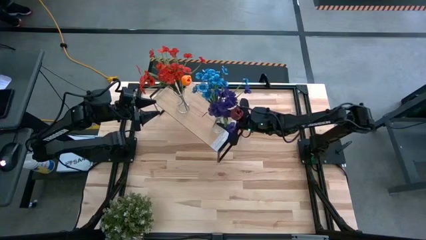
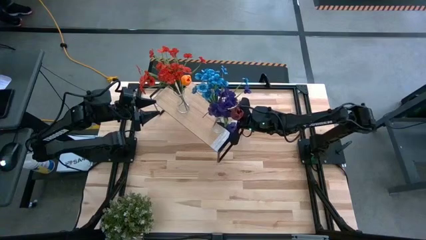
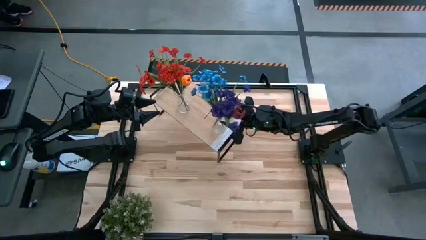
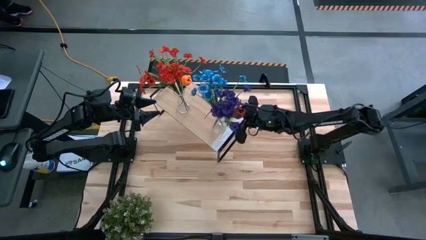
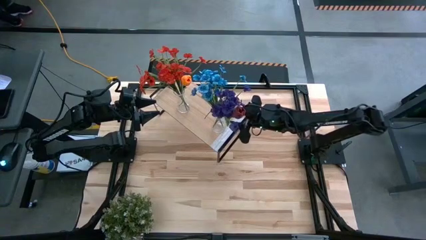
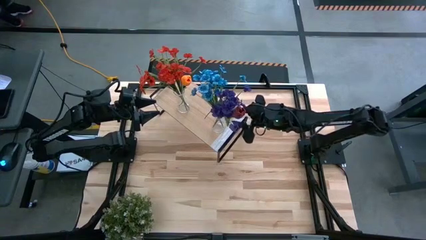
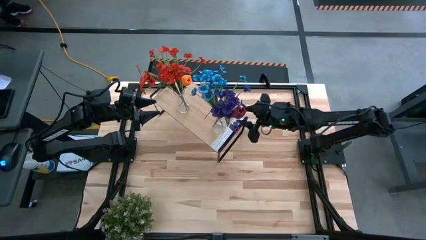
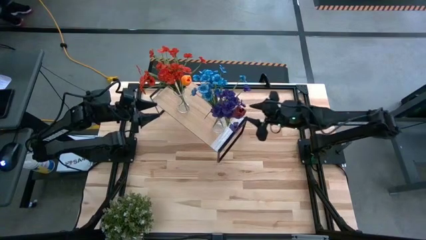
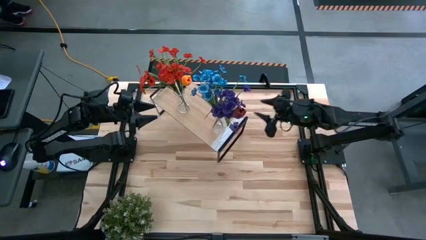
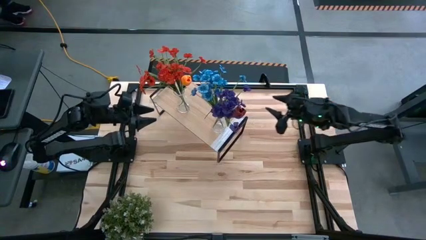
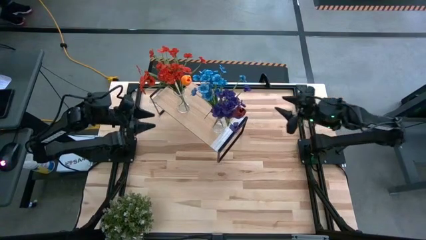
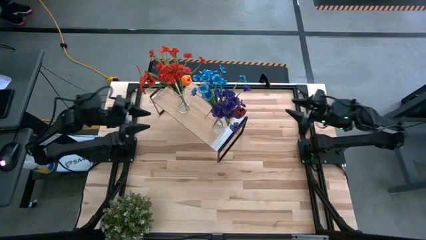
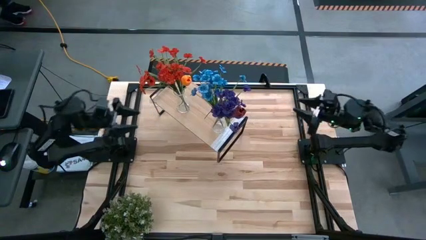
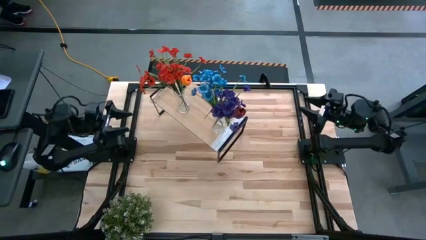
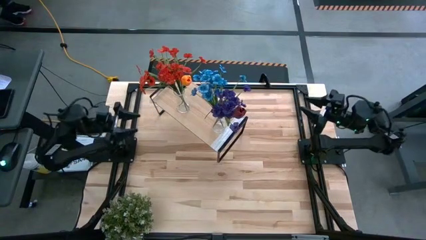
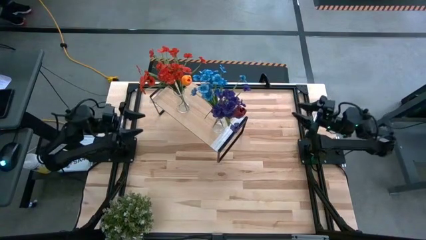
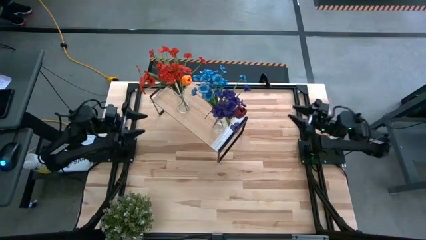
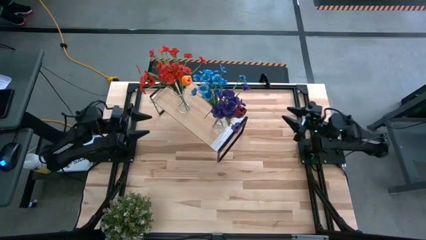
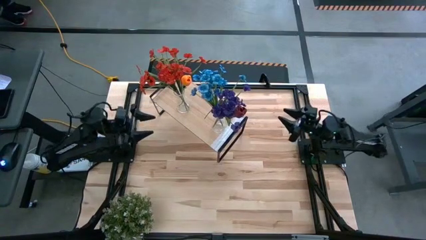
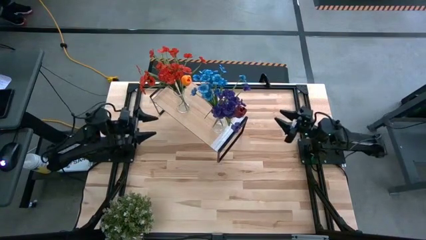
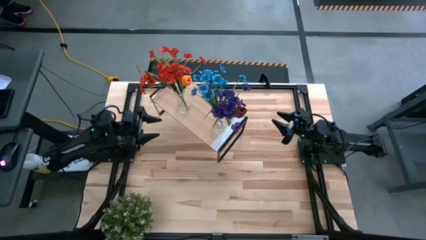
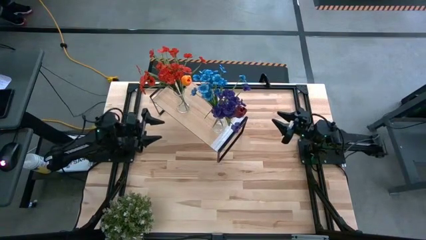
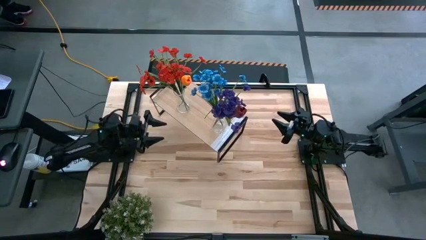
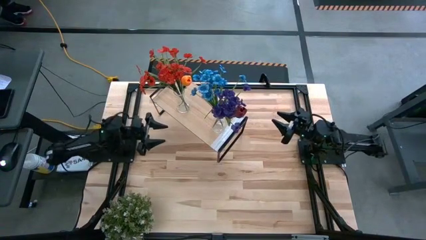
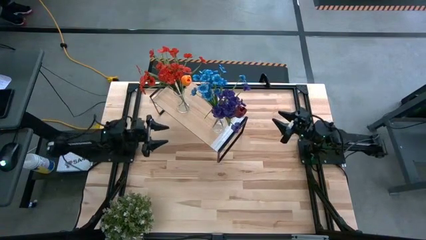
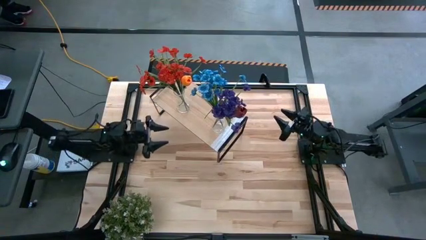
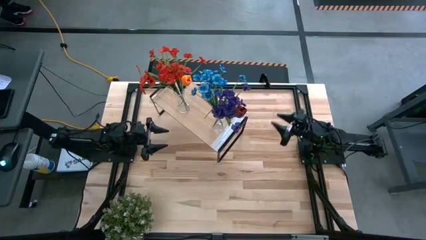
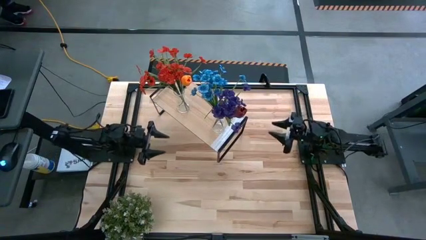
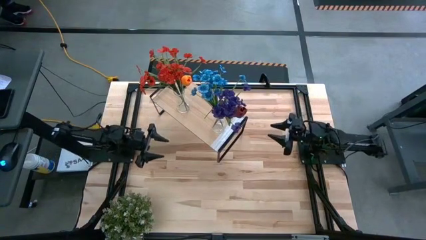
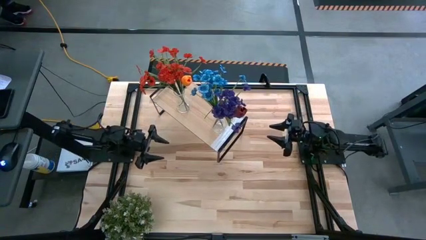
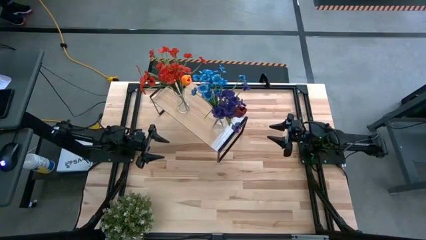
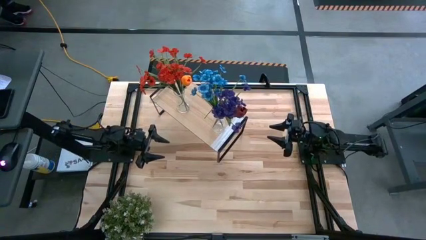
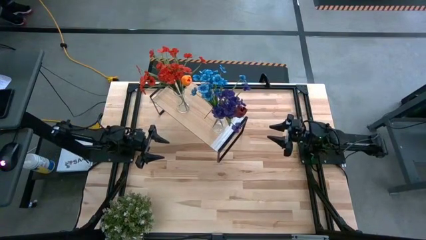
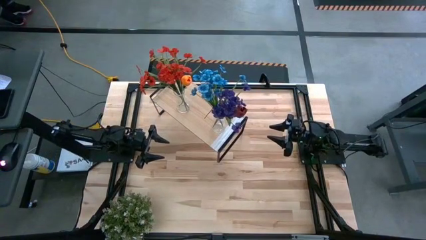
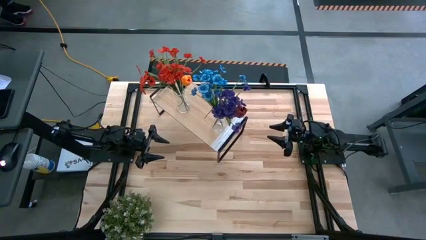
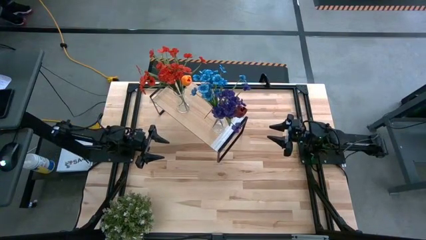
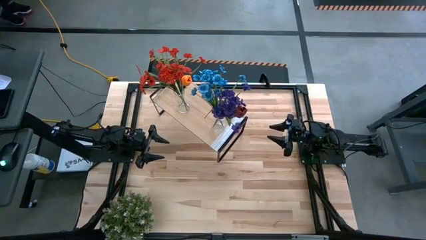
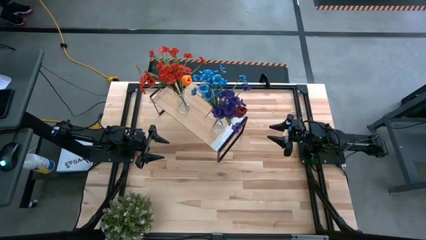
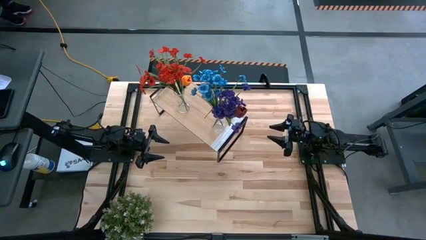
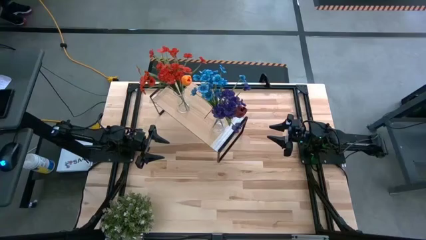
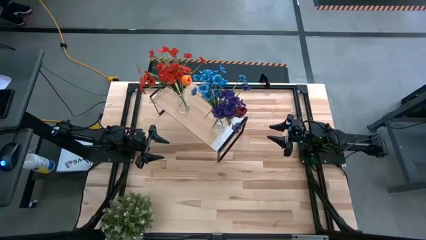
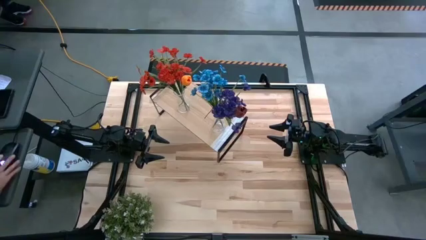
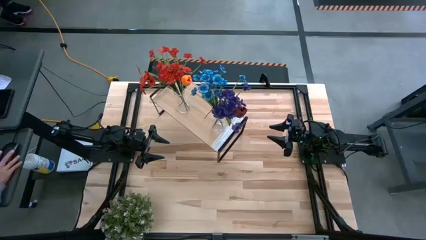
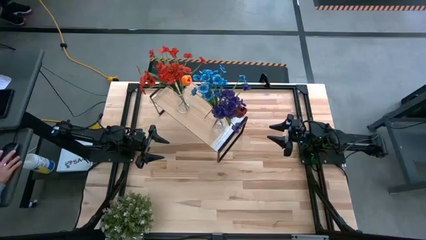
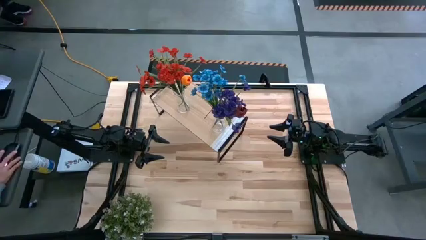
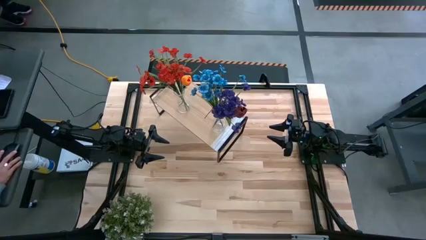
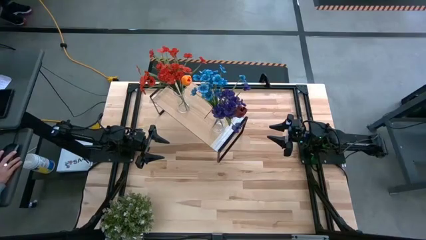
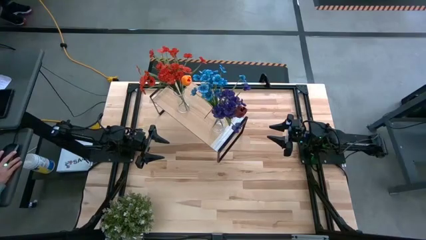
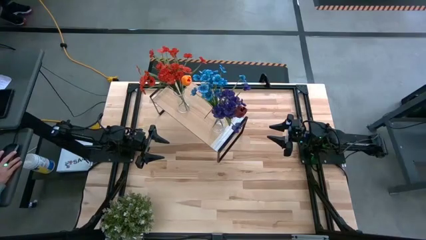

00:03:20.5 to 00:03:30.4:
Task: Pick and place flowers into a vace then onto a shelf
Return to Home Position

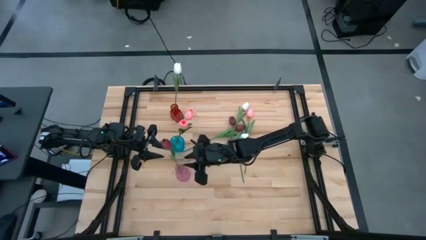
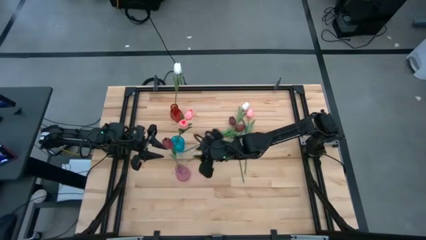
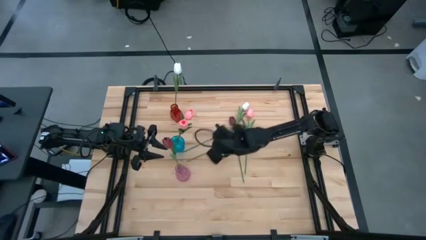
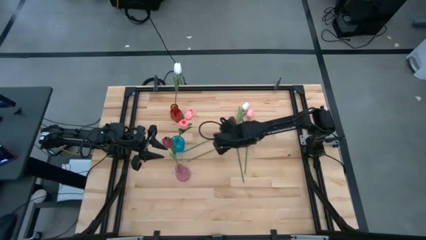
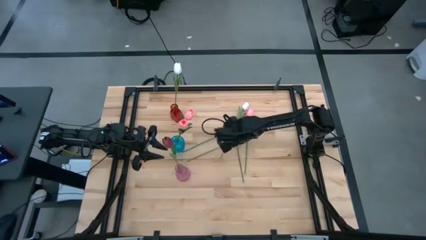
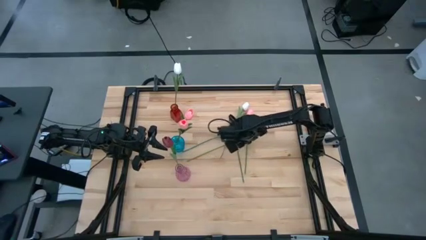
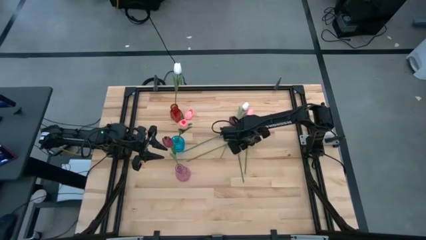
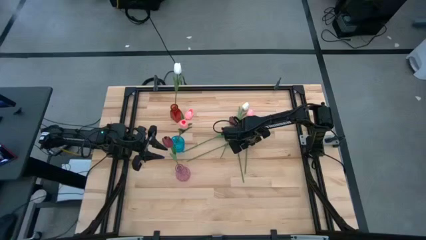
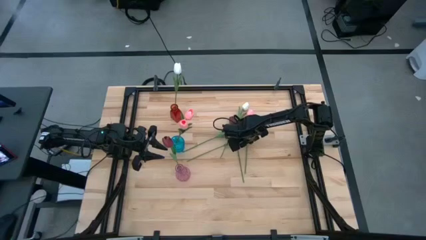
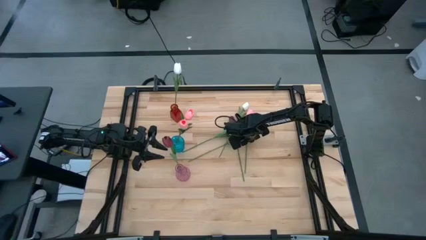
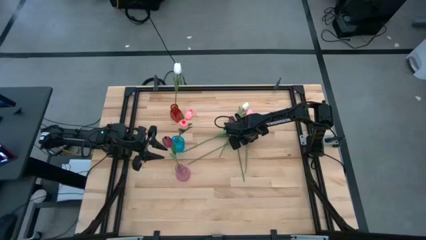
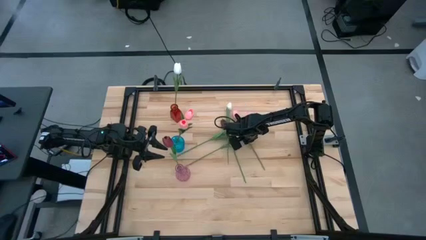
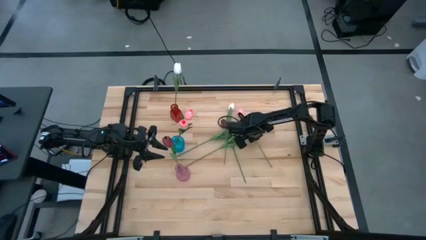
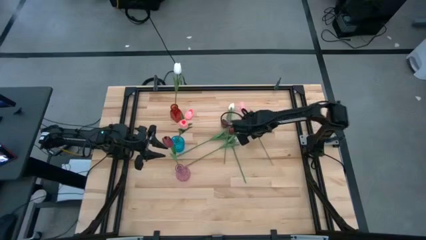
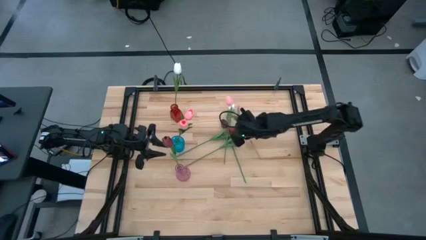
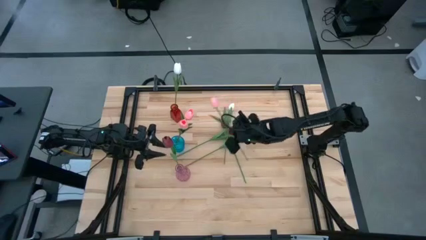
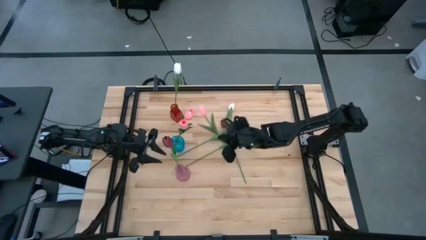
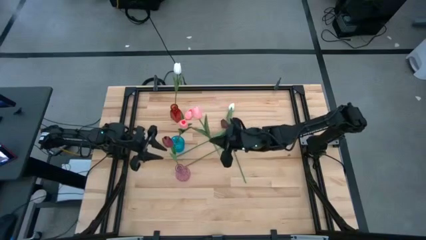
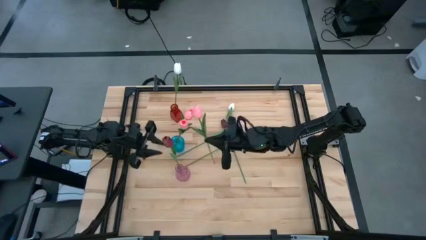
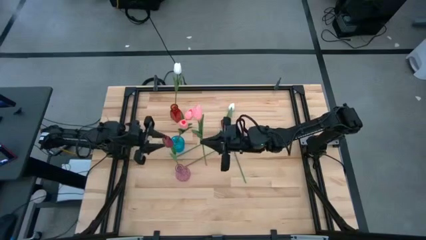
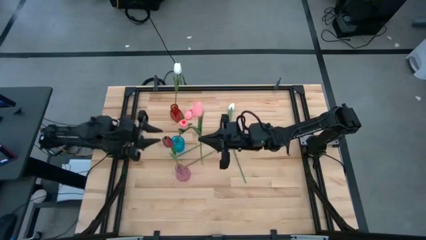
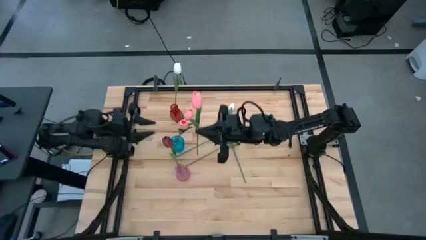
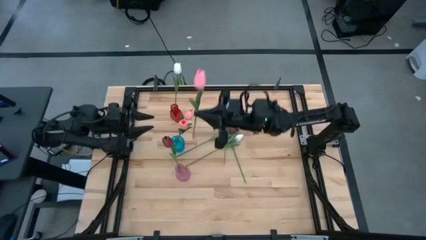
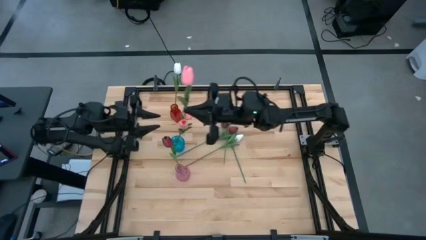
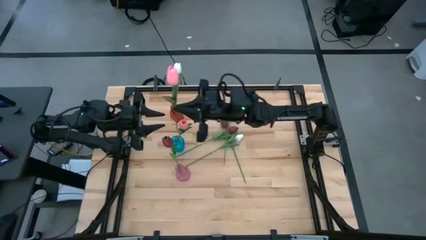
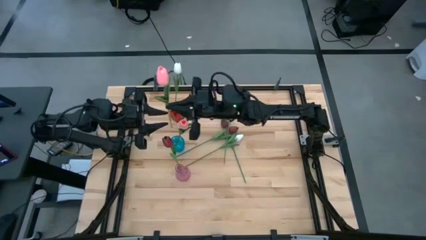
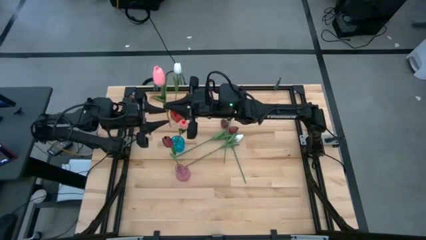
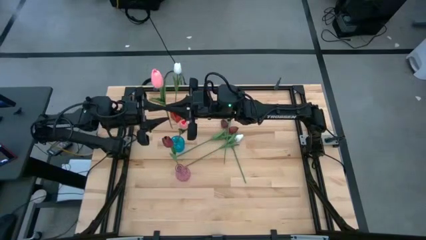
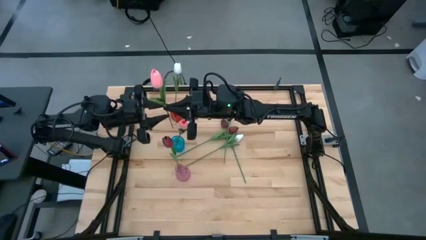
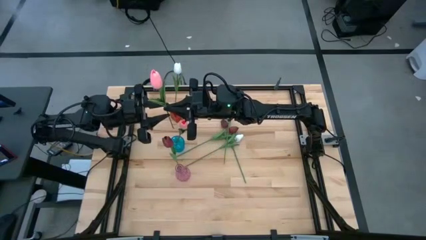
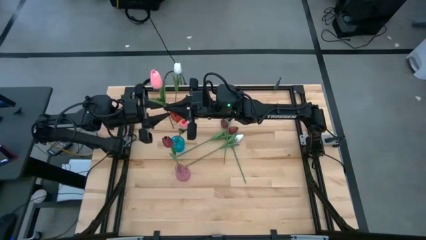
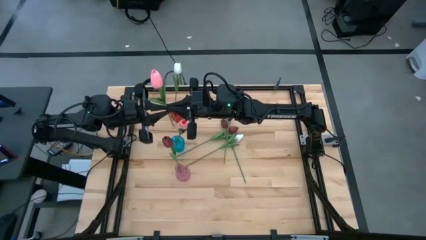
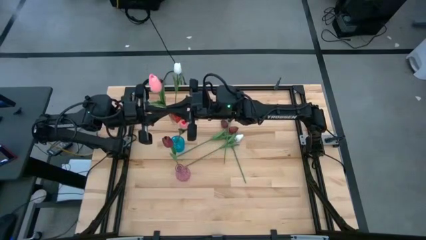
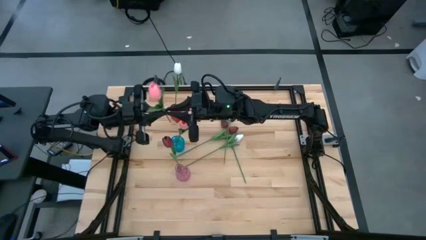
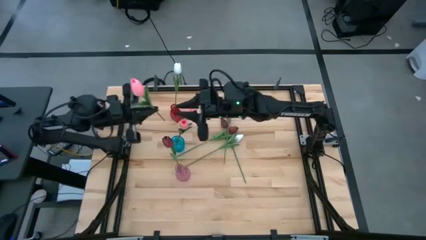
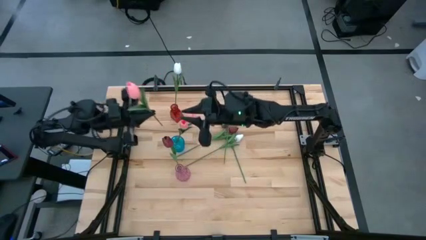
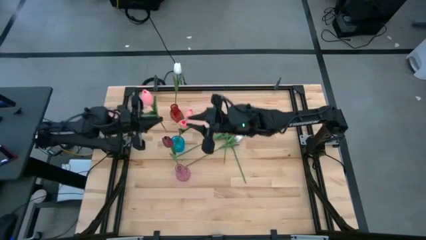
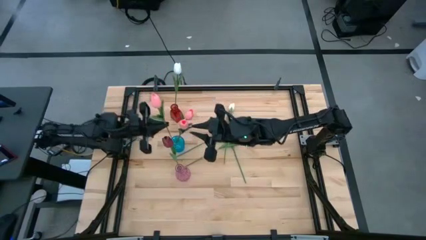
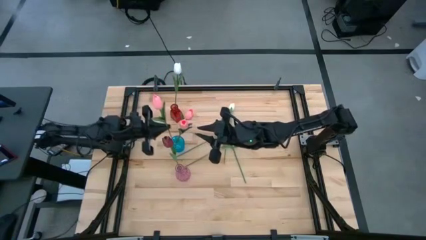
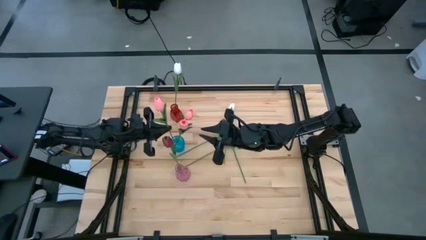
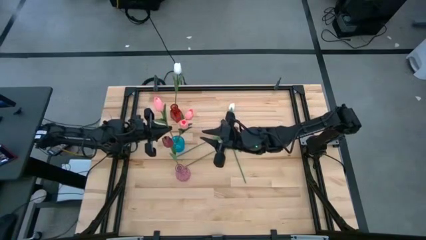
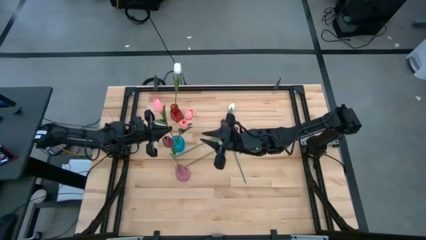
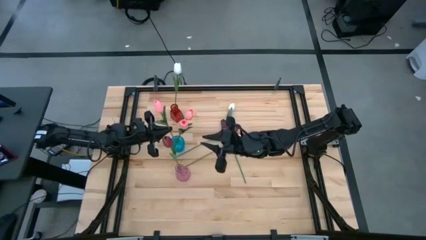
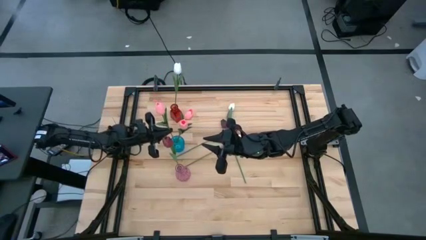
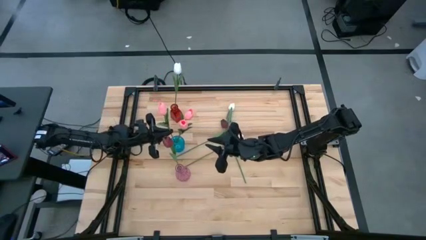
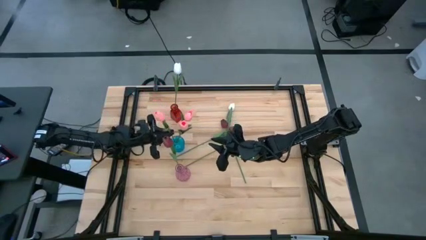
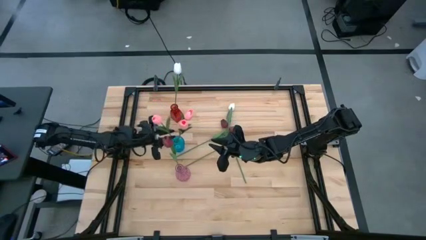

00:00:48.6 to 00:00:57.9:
Task: Sort flowers into vase by color
Put the pink flower into the blue vase
